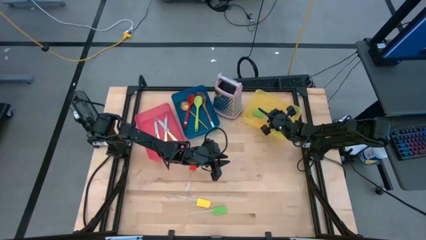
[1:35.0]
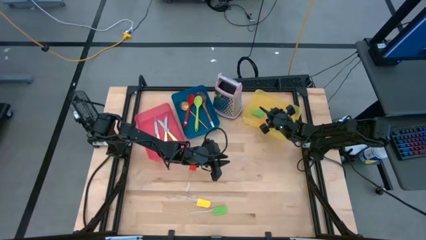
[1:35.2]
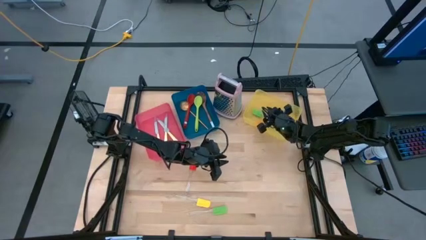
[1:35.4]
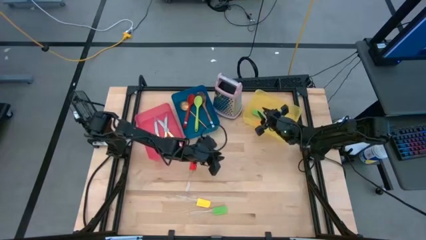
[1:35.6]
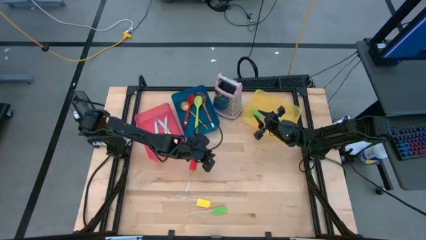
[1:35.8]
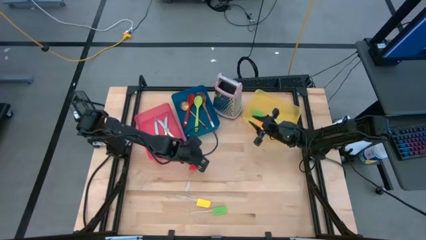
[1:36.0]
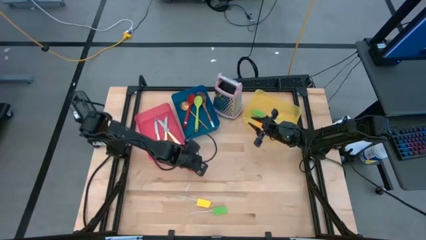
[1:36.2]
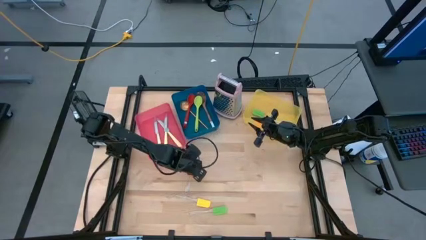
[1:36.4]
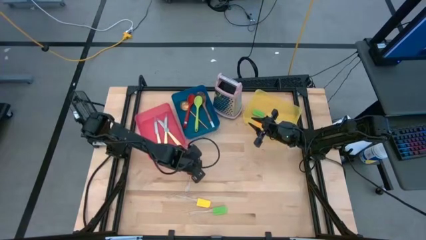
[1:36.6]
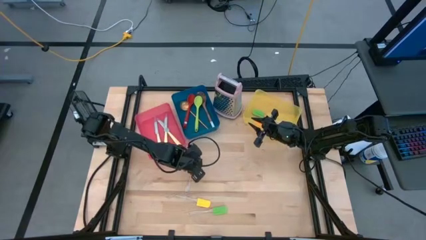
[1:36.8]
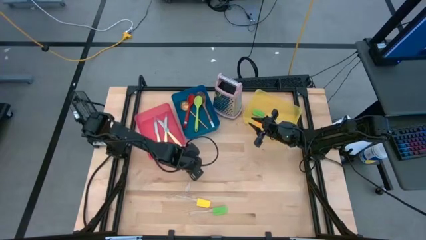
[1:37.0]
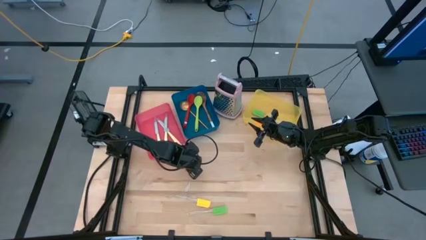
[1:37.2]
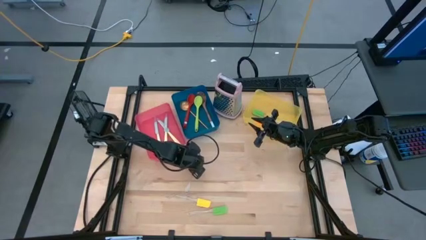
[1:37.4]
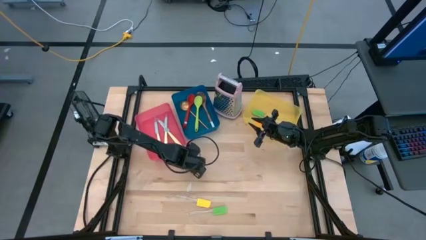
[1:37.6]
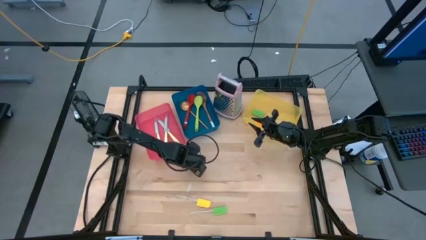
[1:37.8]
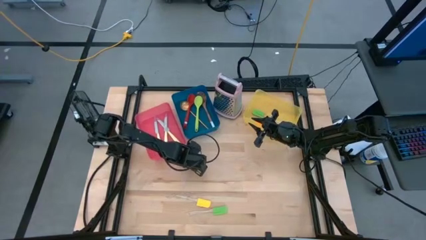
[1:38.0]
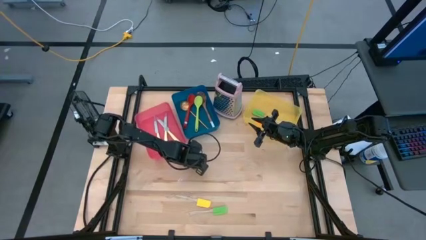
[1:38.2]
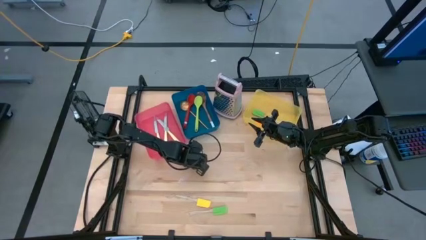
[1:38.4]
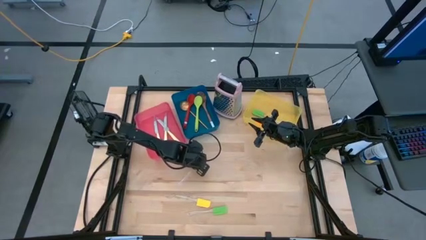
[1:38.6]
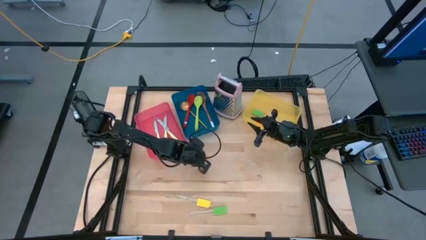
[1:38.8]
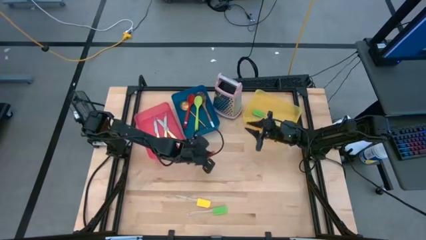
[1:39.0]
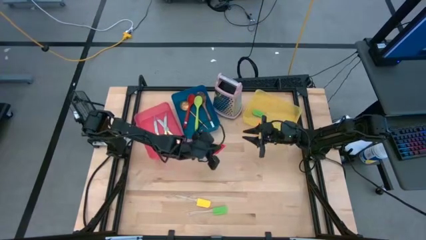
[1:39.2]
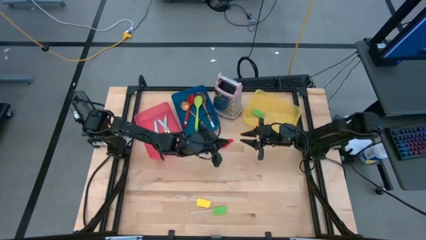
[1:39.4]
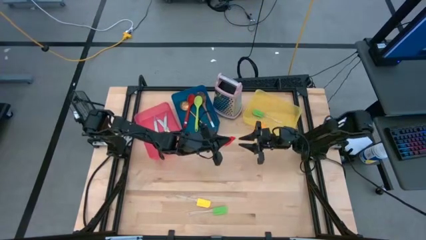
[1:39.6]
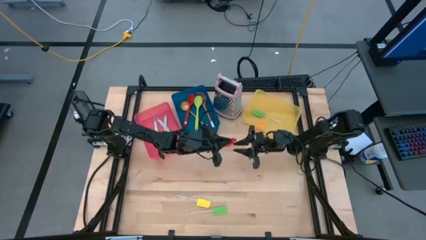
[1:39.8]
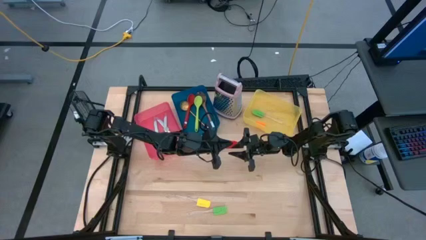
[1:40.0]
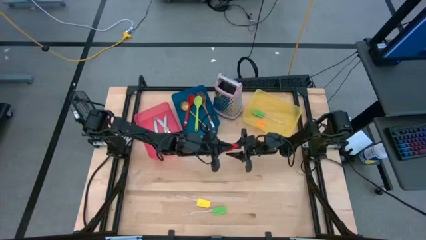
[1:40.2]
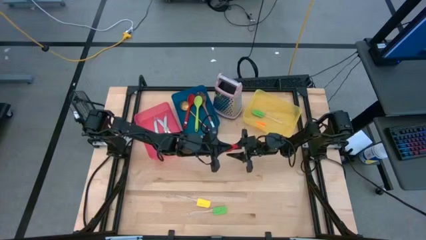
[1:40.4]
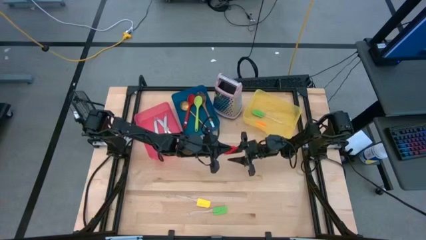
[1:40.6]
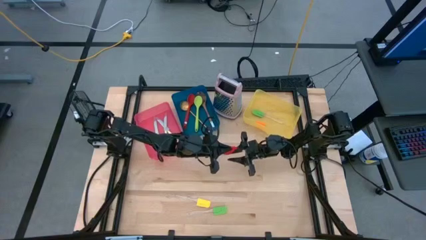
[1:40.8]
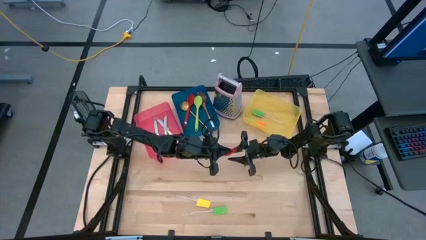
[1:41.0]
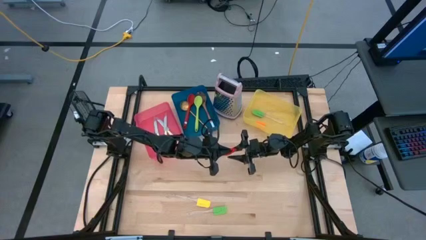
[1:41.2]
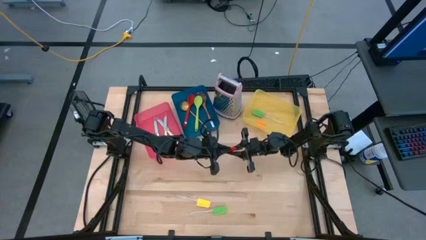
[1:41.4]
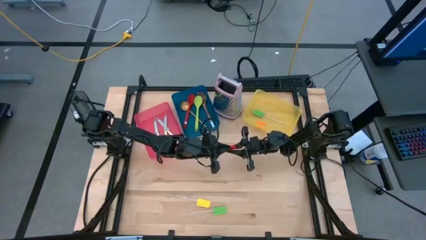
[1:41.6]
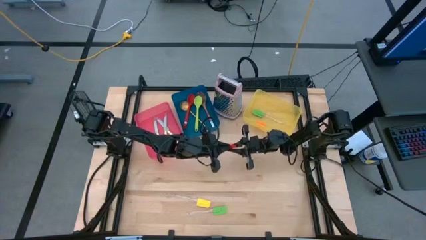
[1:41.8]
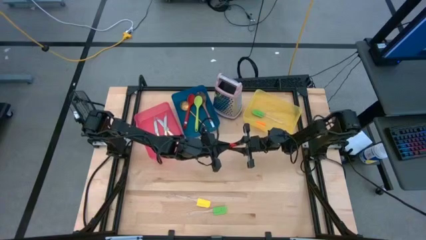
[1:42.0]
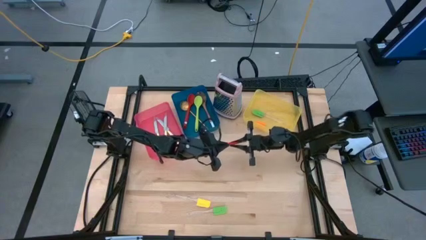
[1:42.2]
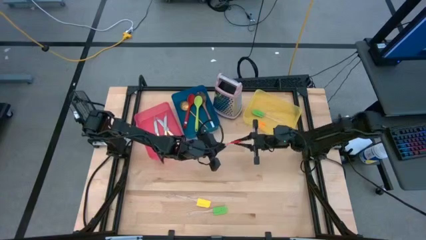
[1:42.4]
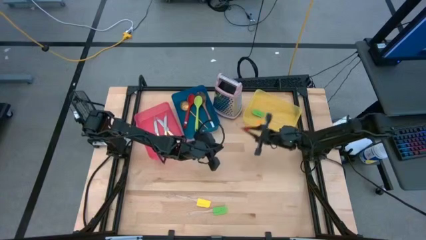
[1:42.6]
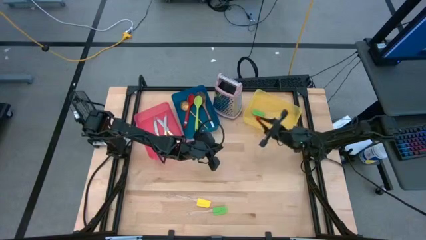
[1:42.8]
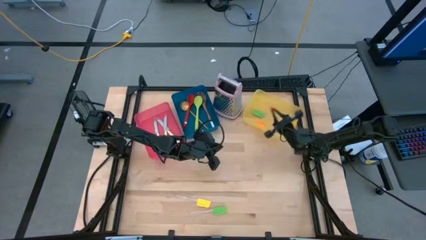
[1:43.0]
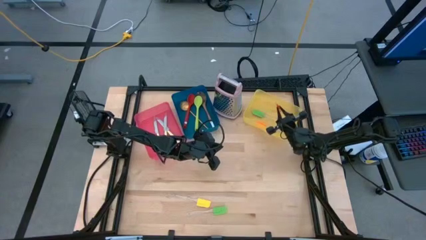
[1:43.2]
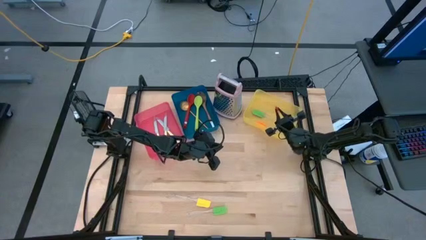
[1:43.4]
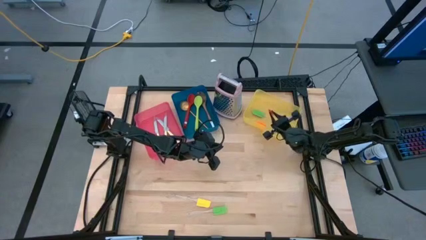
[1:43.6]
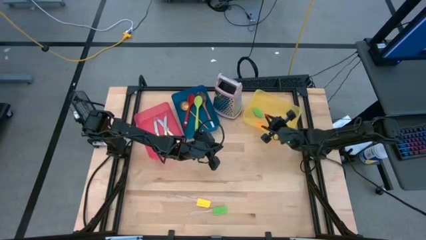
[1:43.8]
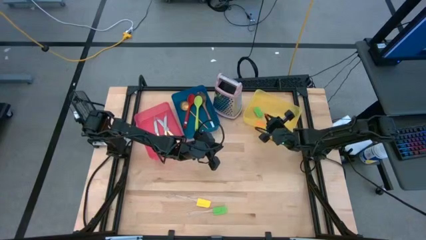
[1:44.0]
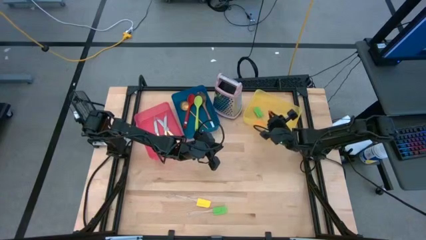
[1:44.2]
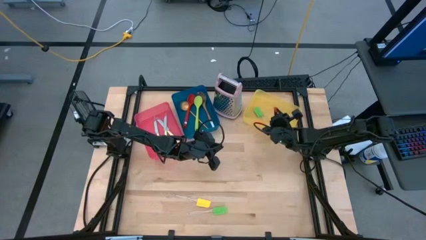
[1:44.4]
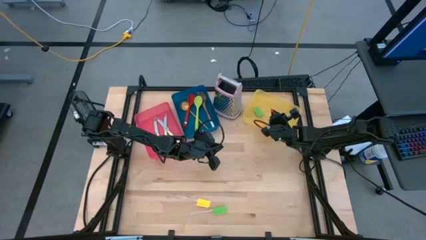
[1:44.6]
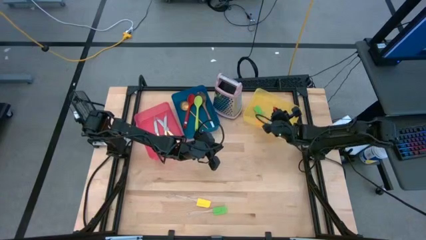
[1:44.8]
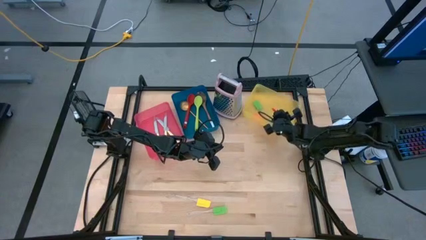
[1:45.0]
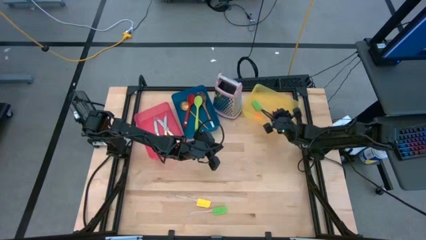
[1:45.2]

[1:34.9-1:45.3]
Task: Pick & Place Kitchen Items
Put the red spatula into the yellow bin

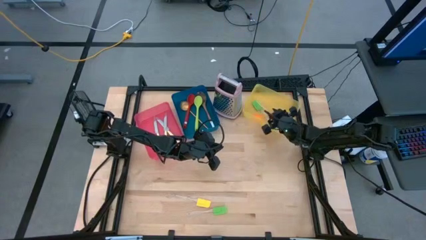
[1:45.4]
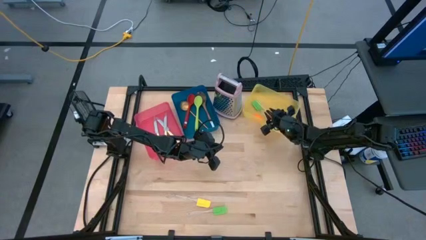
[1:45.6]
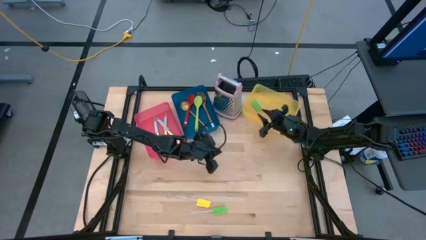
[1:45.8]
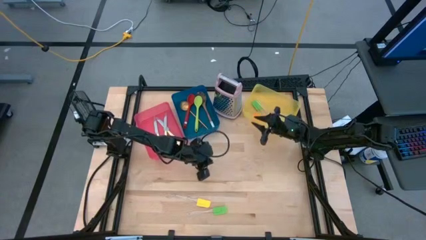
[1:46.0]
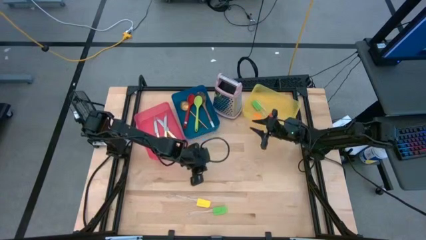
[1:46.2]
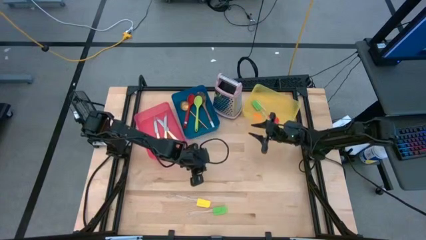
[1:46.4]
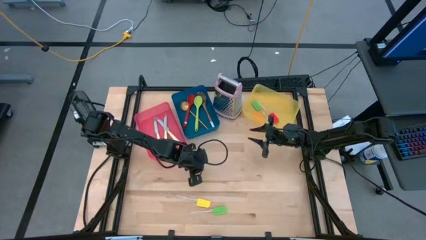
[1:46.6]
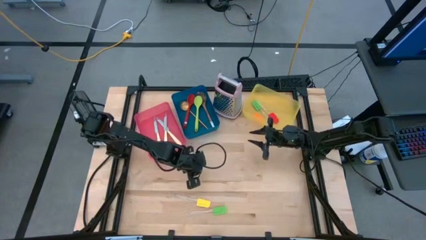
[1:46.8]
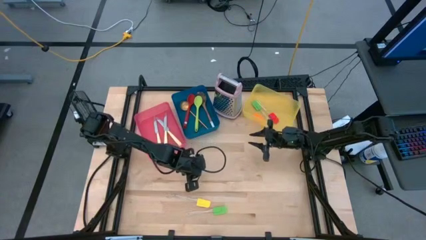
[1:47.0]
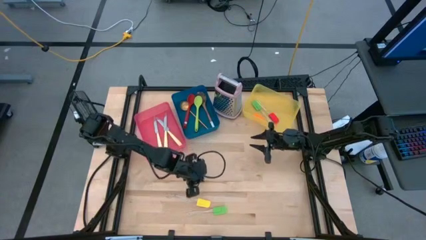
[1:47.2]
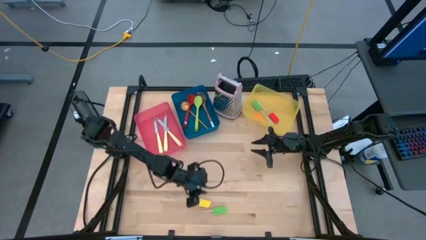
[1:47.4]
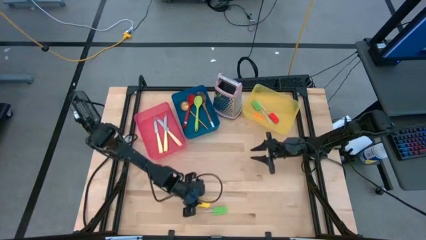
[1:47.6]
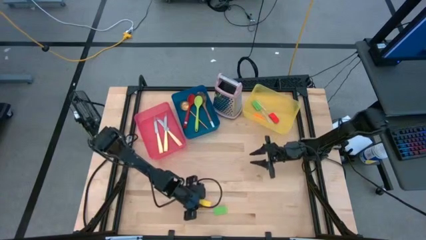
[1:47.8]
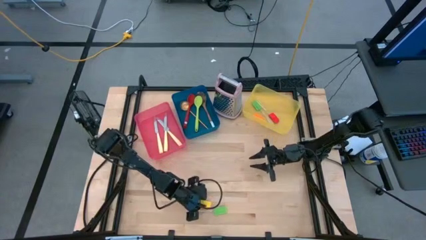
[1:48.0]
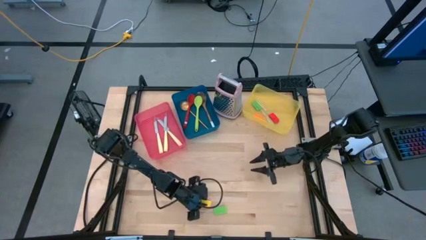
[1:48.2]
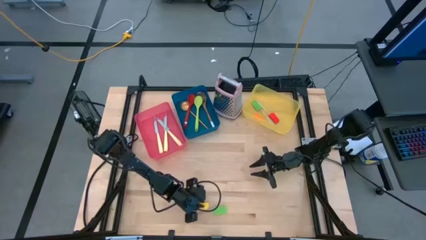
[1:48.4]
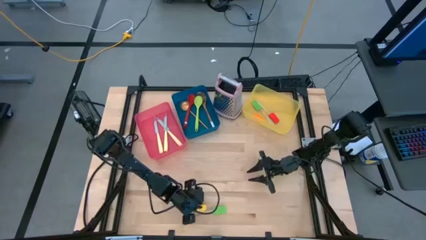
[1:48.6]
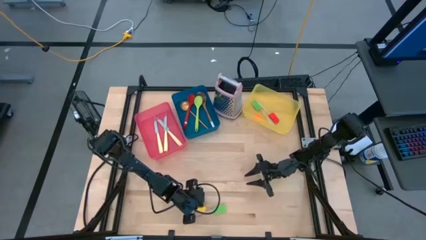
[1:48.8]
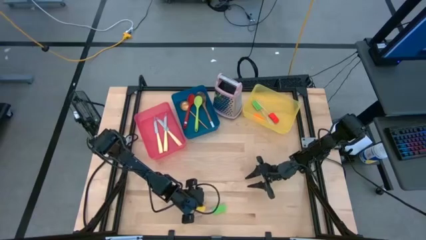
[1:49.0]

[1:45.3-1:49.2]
Put the yellow spatula into the yellow bin
